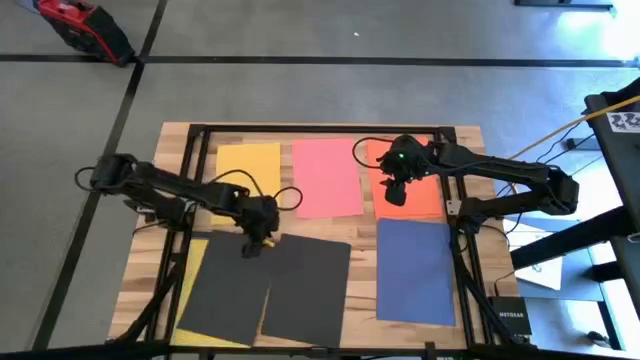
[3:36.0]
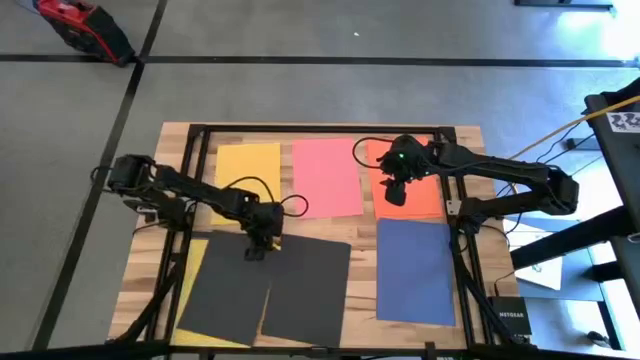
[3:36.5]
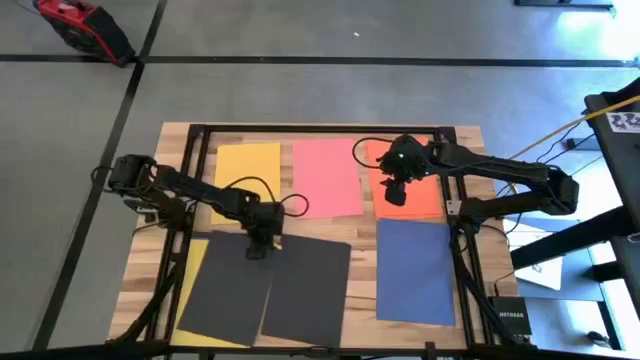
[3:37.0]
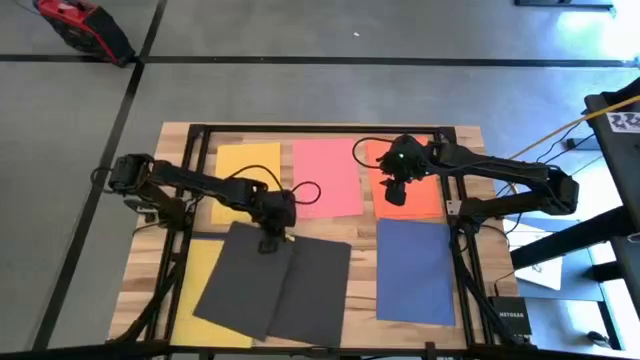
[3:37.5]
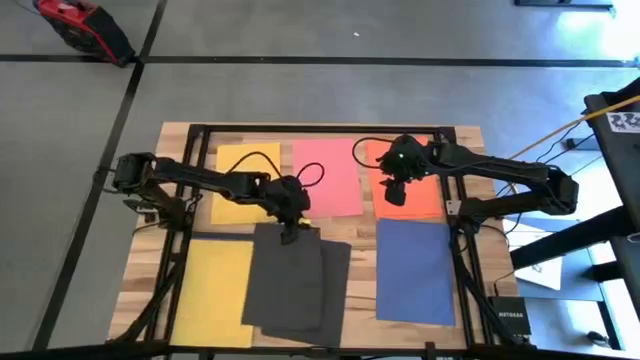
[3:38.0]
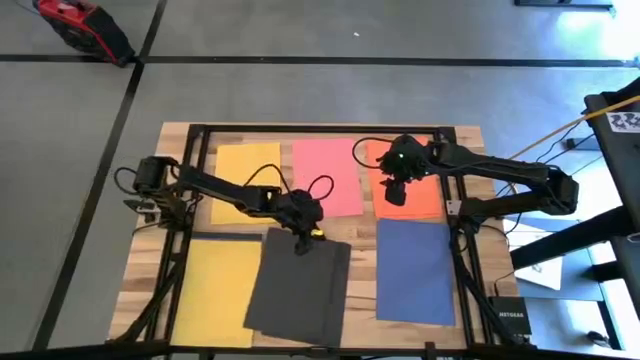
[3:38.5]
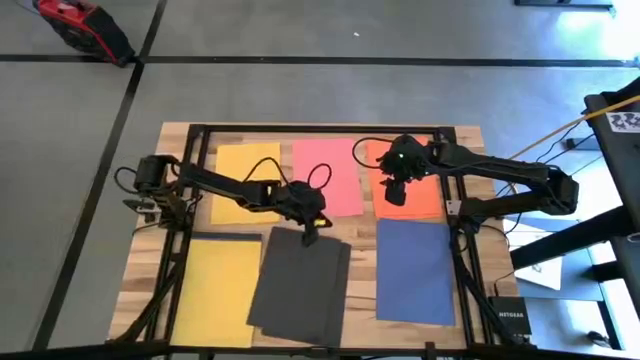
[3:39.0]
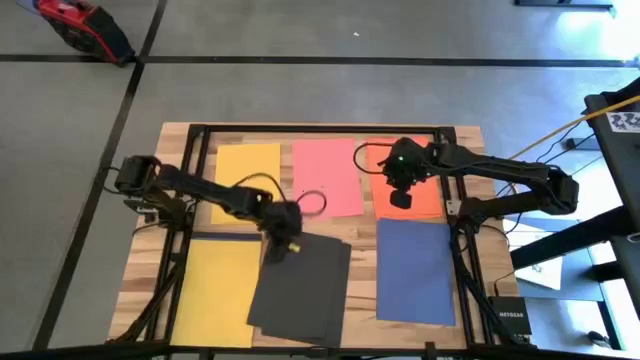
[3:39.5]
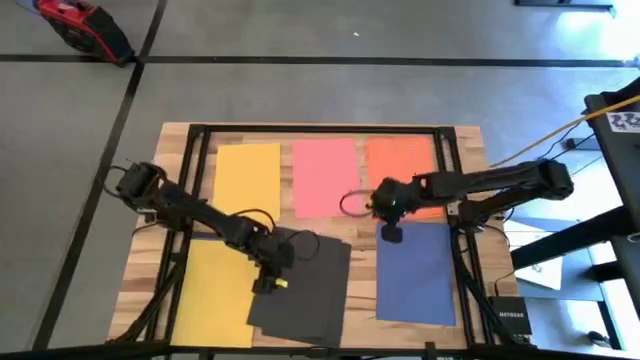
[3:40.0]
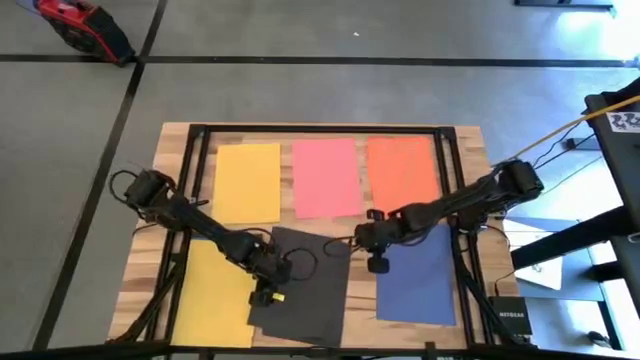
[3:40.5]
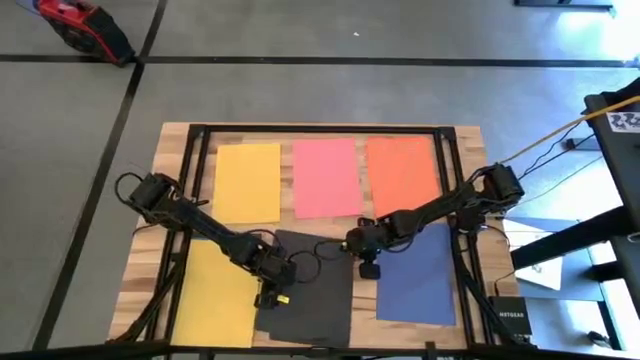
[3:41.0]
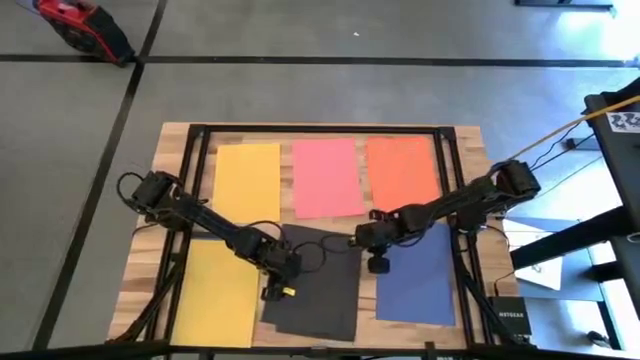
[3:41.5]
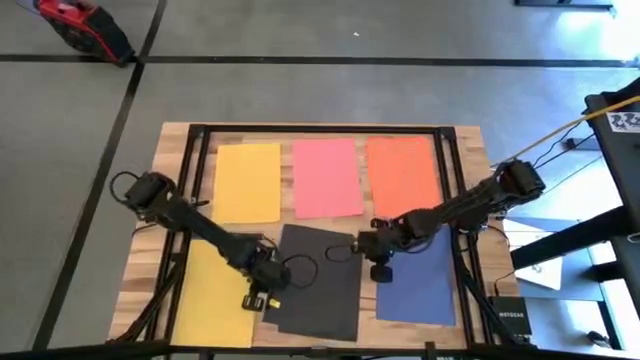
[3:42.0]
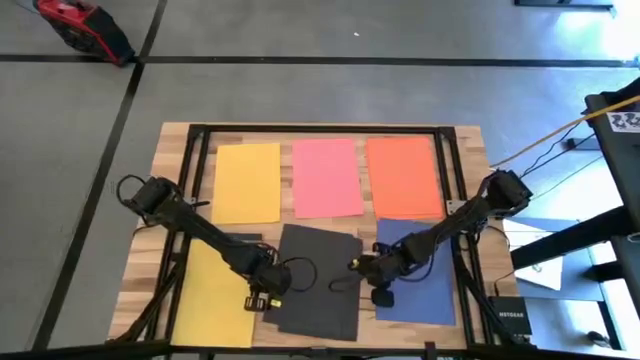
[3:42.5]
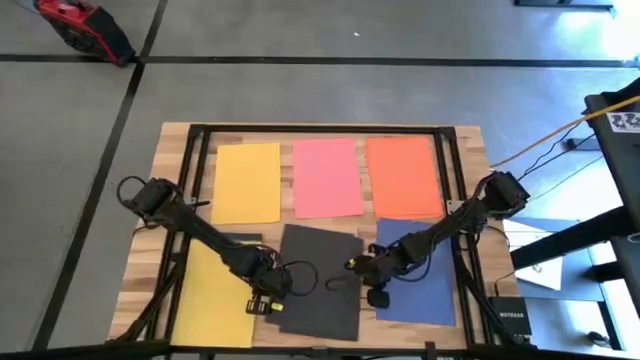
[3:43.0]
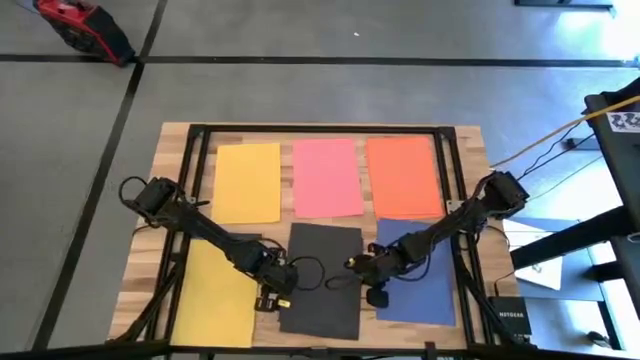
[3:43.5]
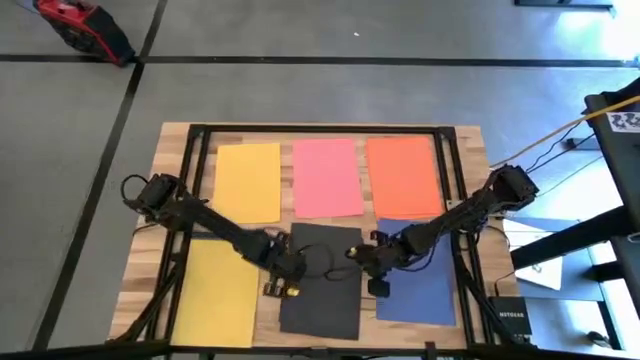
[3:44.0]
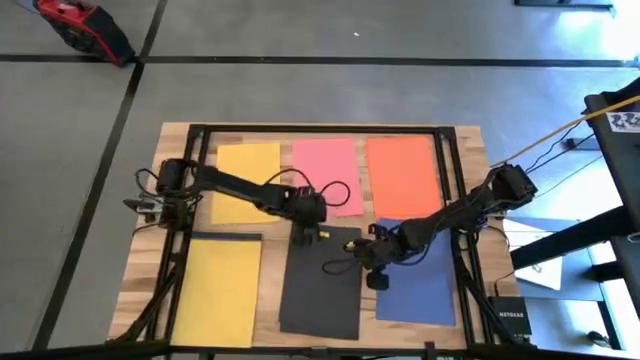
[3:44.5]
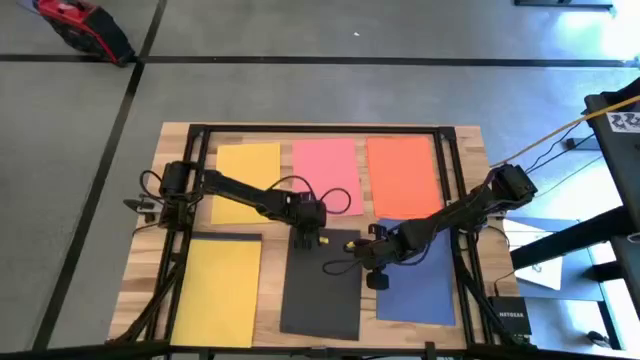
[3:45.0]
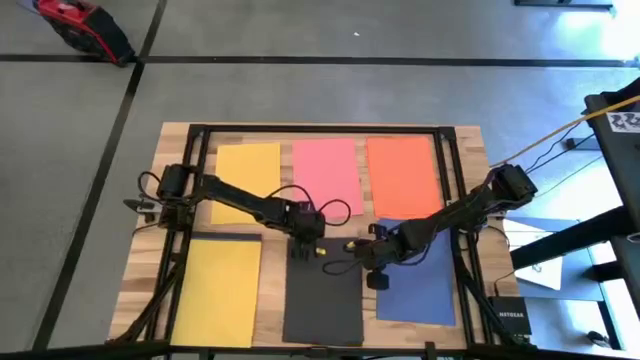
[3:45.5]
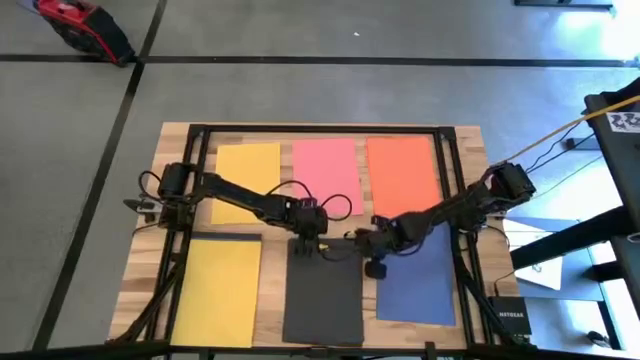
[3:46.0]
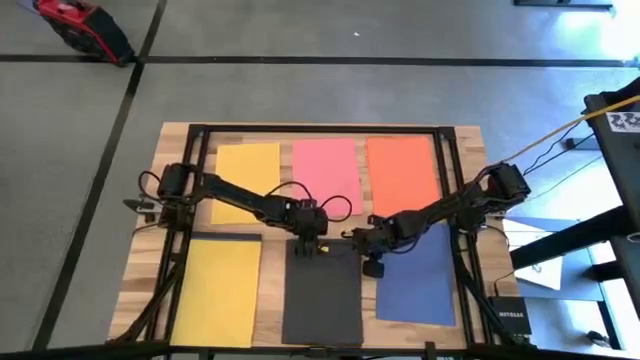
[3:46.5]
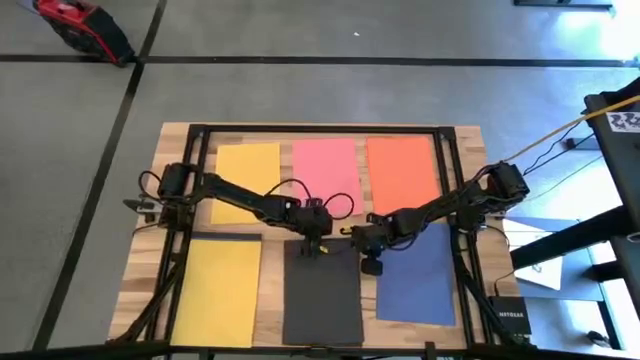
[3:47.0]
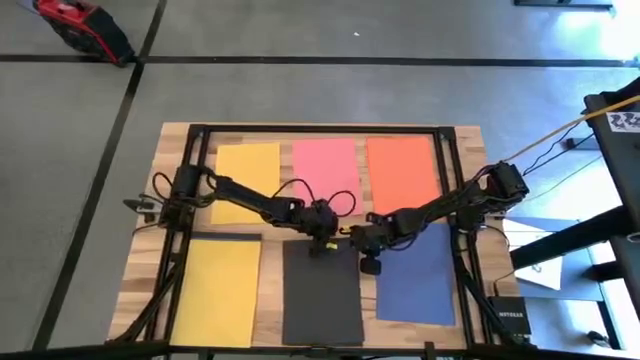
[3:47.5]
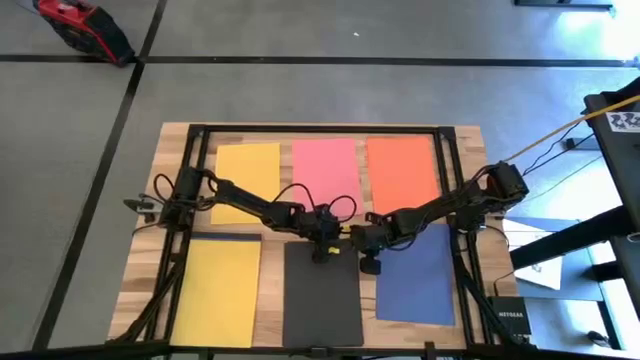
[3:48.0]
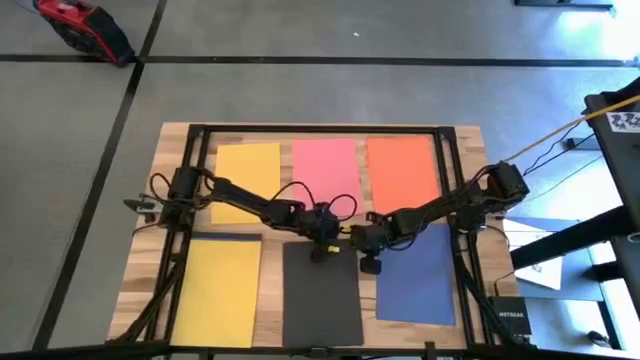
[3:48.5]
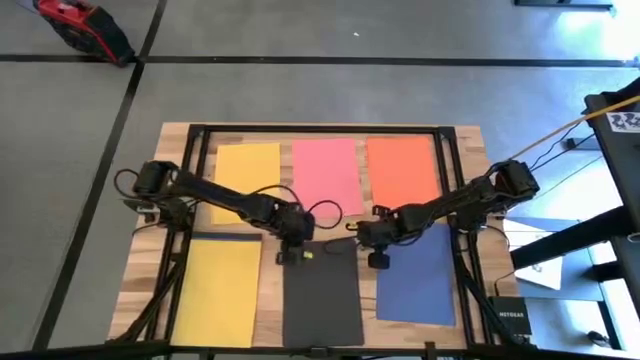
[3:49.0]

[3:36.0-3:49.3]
Task: Organize paper
Stack the black paper on the top of the black paper

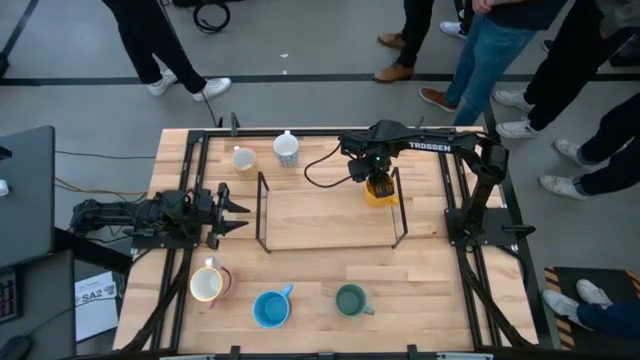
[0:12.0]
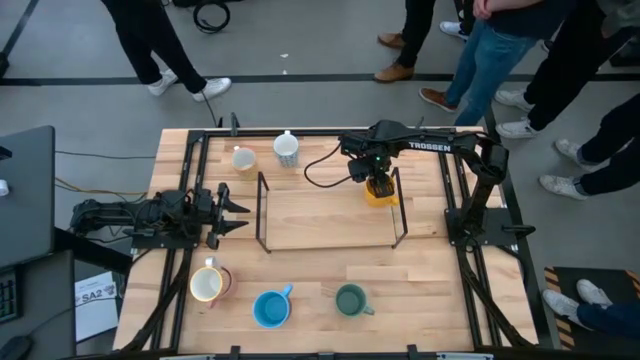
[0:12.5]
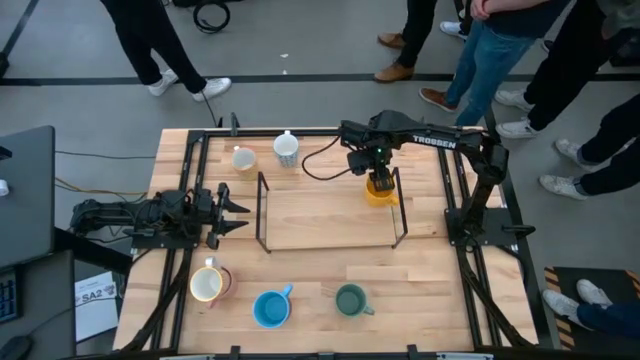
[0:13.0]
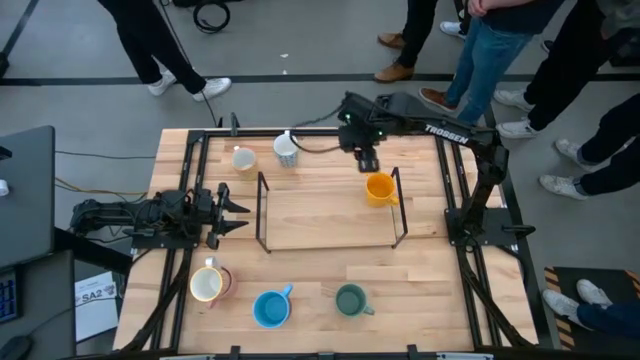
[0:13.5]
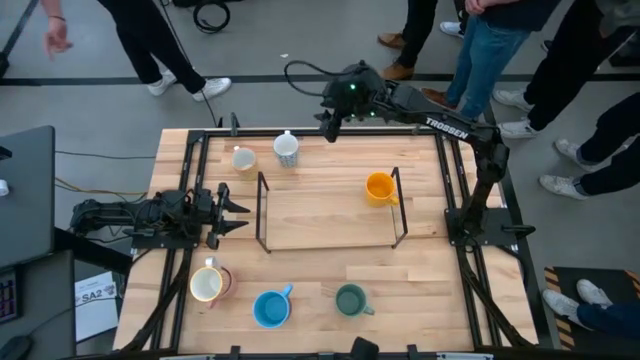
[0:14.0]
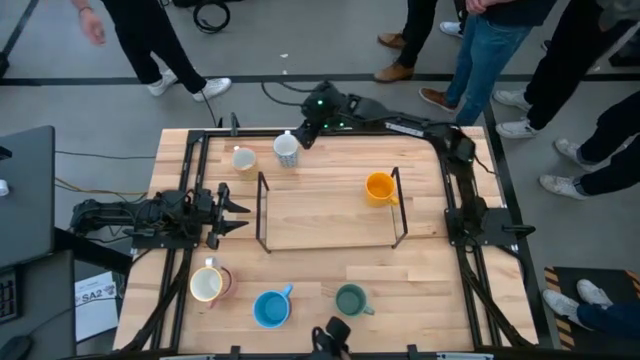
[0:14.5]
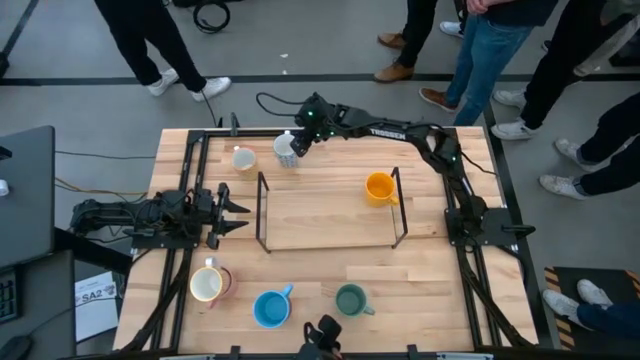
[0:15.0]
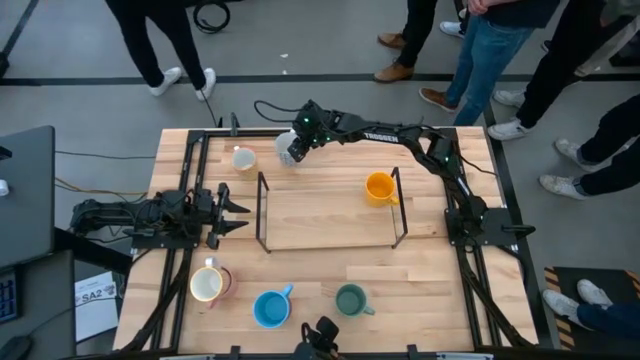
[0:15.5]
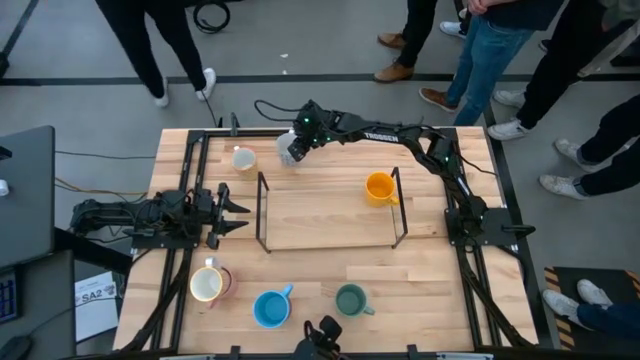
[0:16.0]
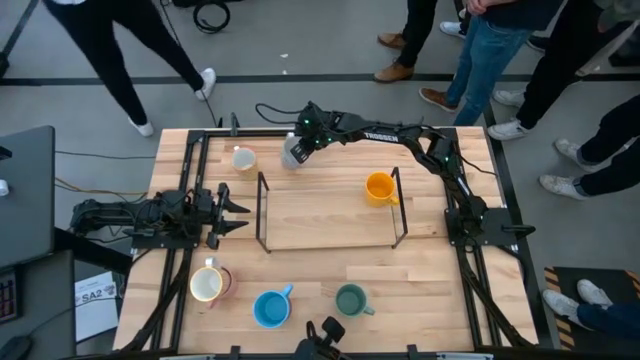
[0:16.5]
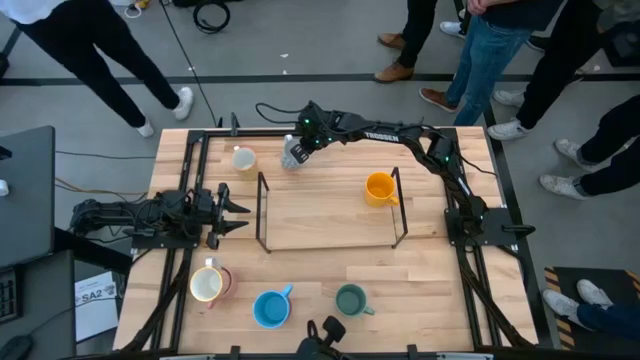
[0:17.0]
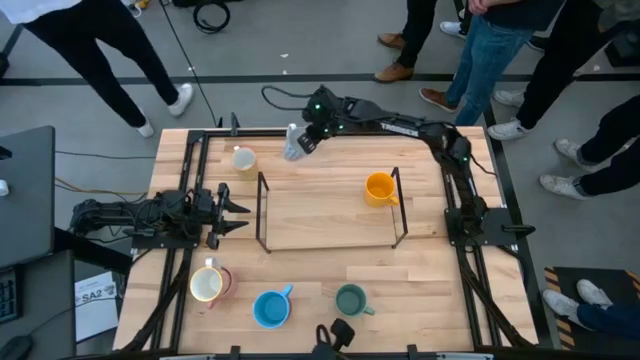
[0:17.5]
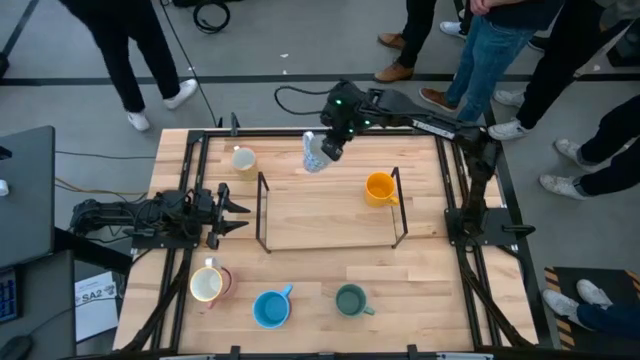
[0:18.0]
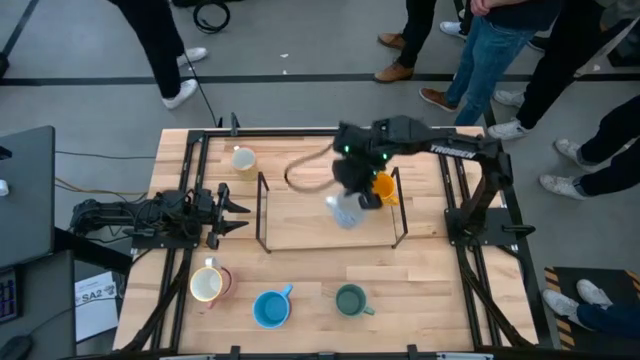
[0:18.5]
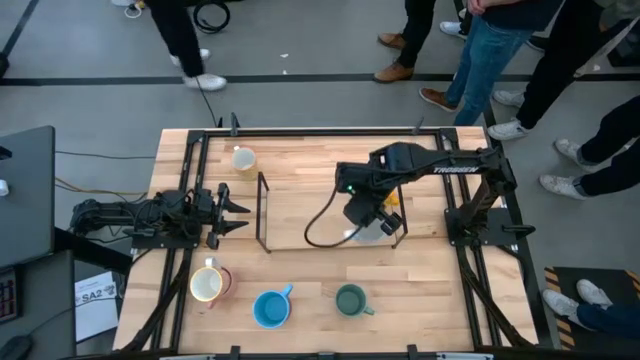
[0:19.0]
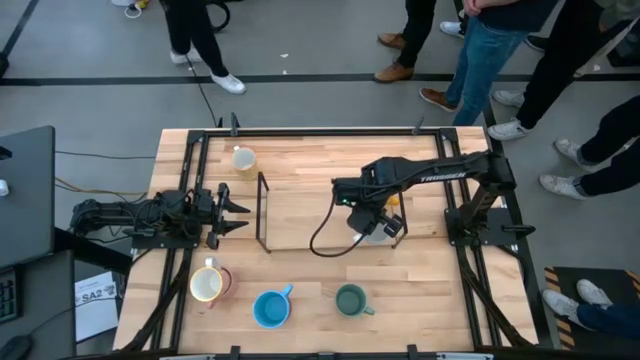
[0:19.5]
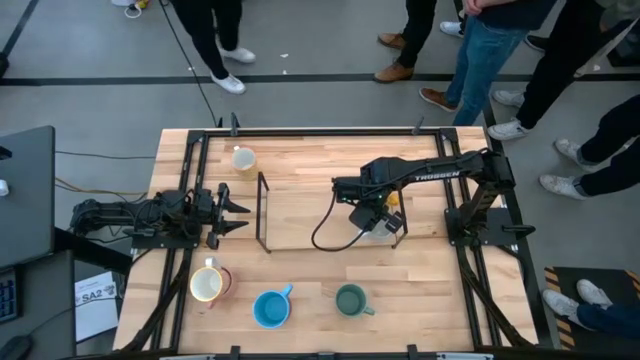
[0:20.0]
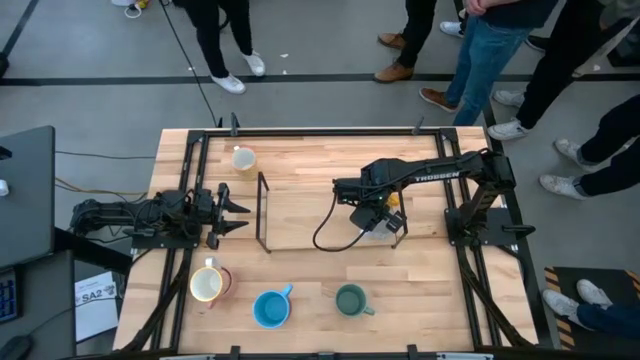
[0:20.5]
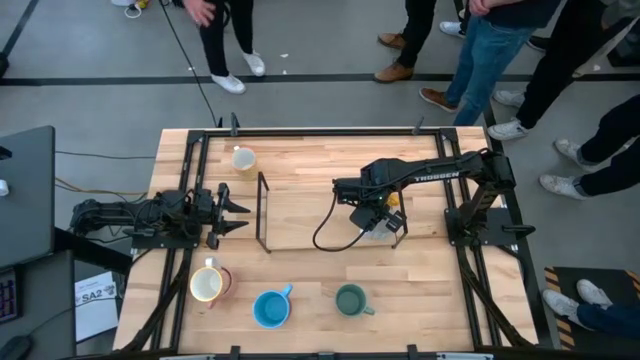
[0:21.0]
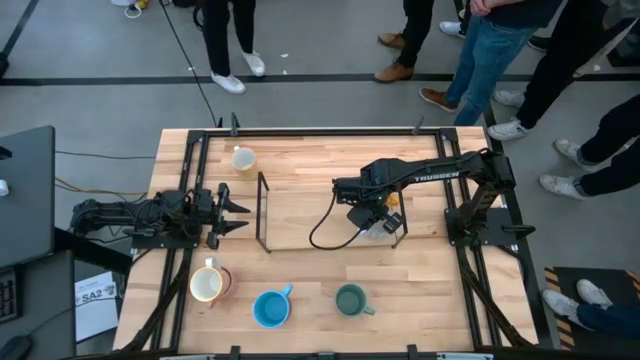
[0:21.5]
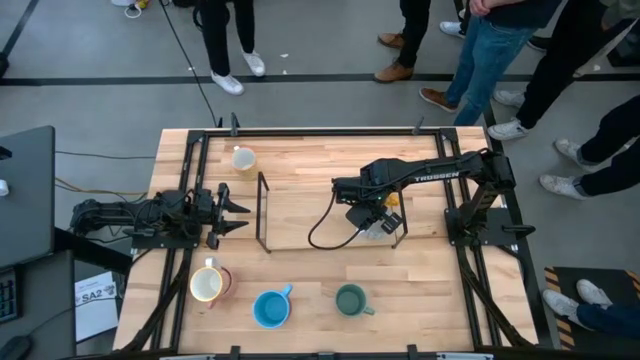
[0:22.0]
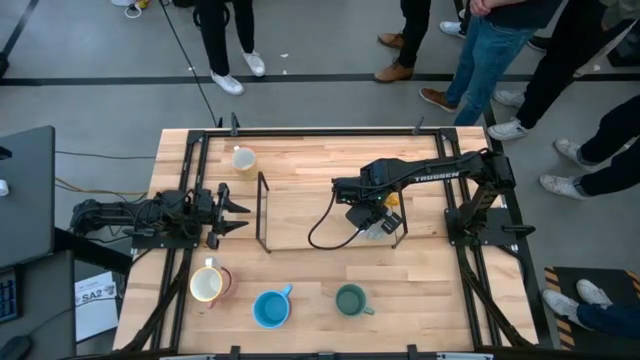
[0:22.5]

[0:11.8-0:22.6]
Task: Place coffee mugs
Put the blue white mug on the shelf
